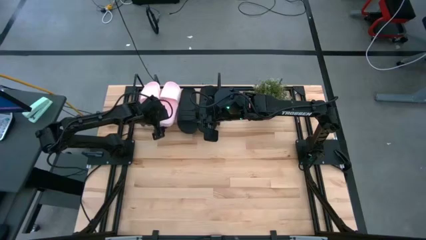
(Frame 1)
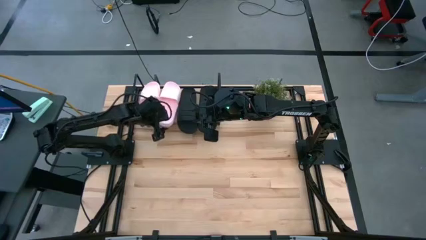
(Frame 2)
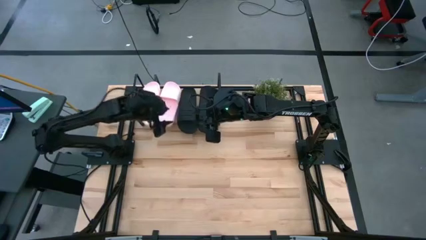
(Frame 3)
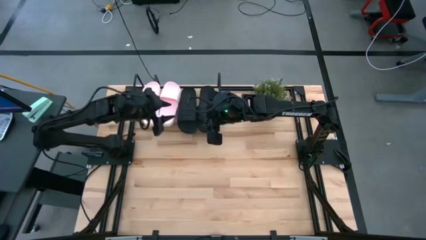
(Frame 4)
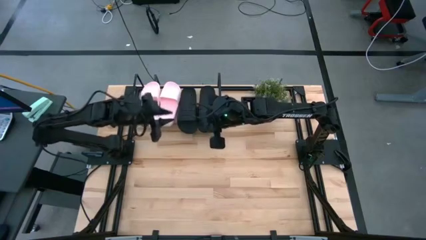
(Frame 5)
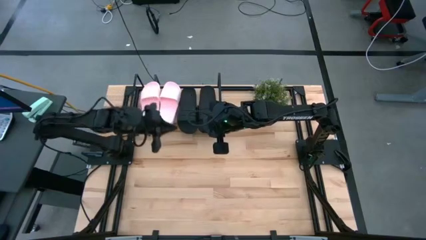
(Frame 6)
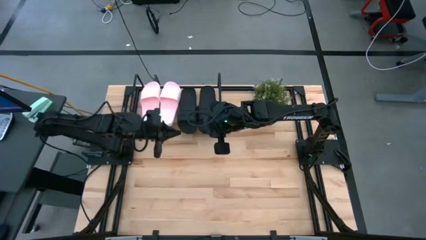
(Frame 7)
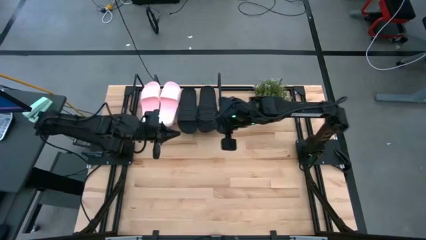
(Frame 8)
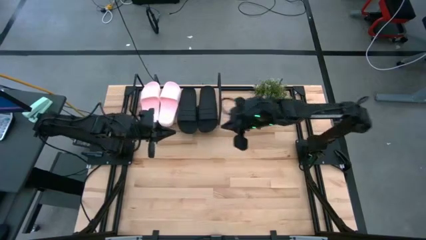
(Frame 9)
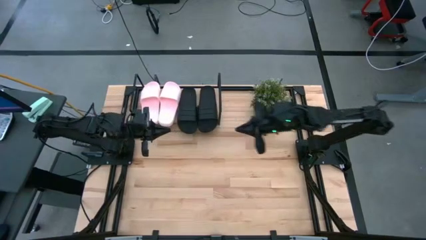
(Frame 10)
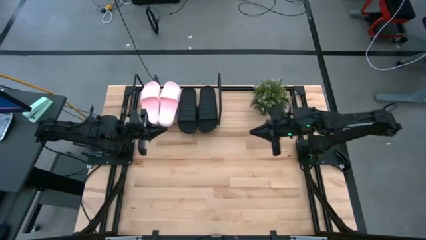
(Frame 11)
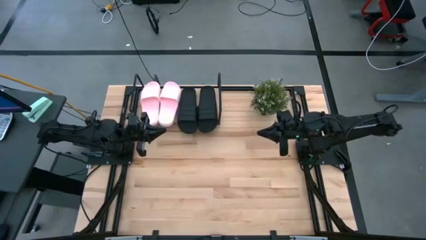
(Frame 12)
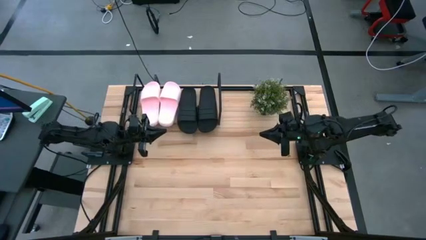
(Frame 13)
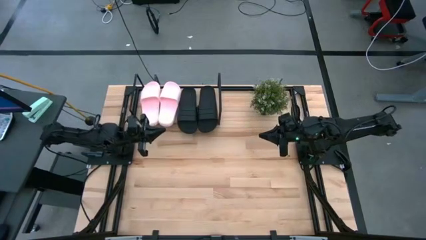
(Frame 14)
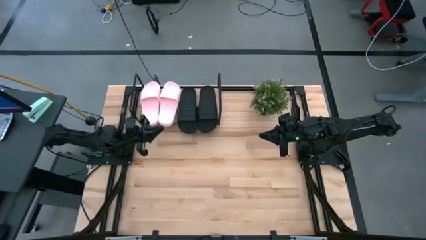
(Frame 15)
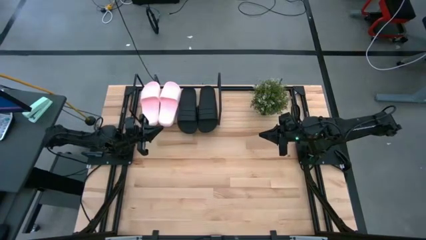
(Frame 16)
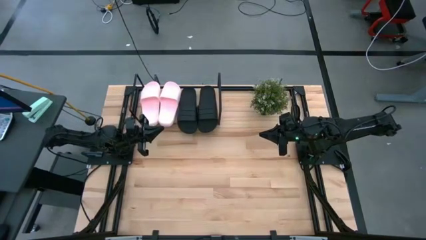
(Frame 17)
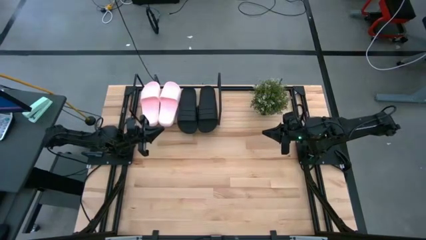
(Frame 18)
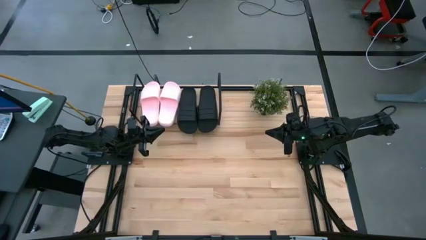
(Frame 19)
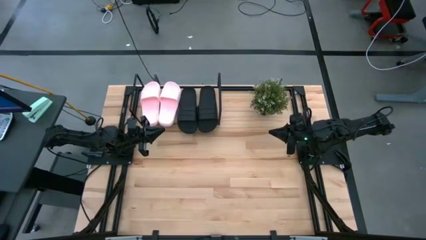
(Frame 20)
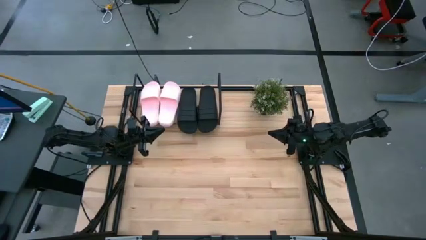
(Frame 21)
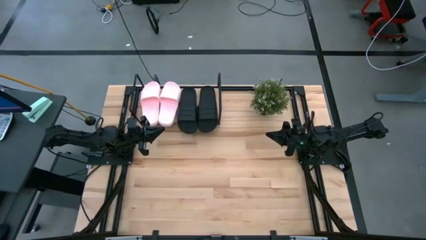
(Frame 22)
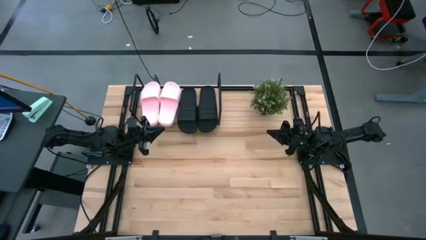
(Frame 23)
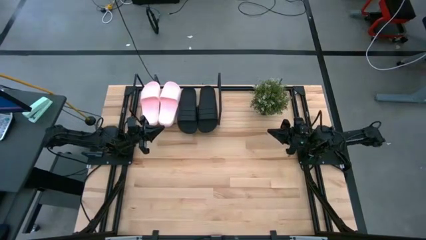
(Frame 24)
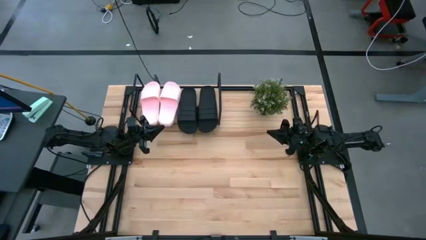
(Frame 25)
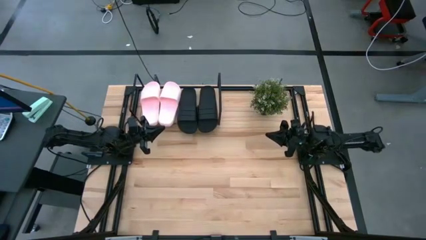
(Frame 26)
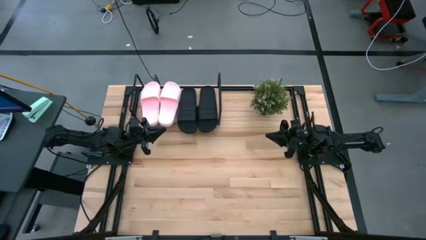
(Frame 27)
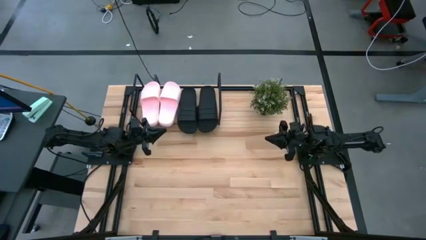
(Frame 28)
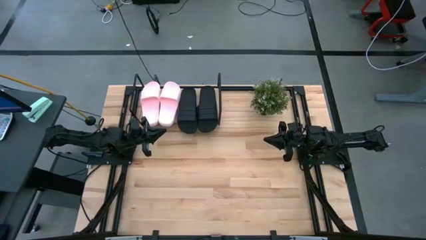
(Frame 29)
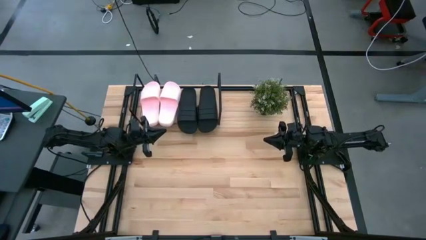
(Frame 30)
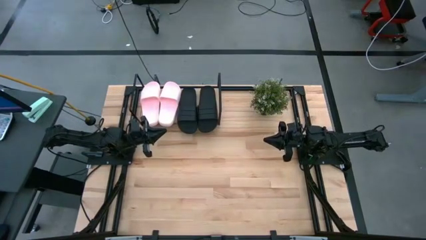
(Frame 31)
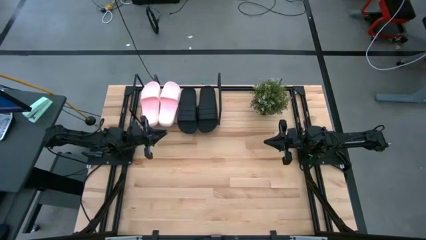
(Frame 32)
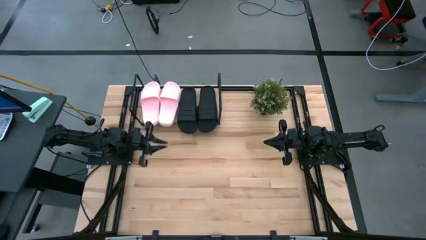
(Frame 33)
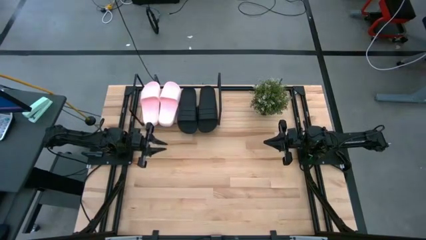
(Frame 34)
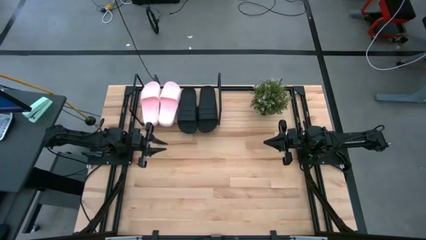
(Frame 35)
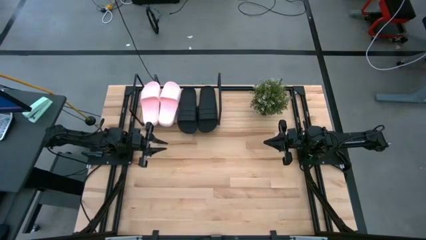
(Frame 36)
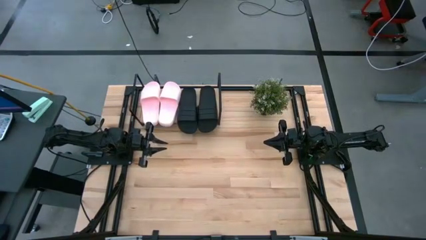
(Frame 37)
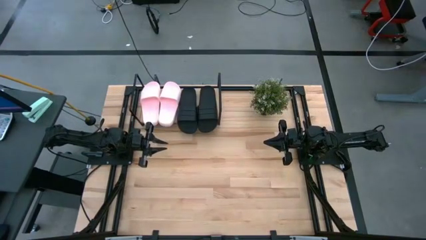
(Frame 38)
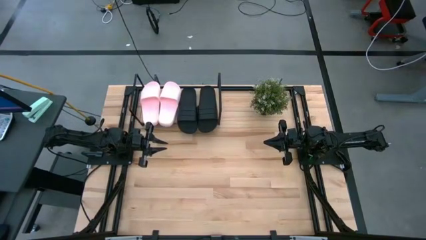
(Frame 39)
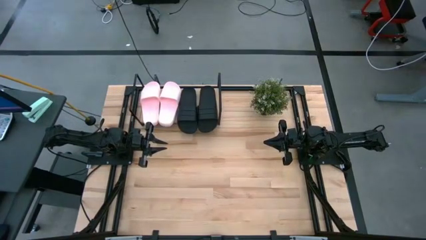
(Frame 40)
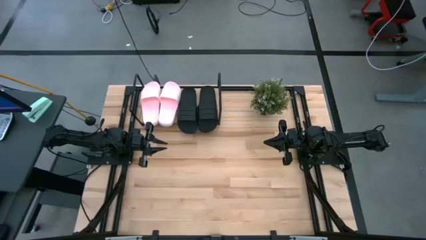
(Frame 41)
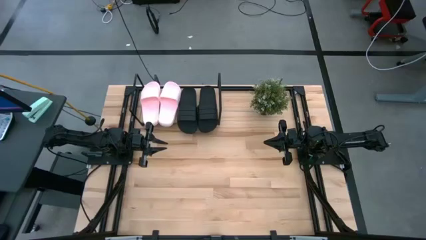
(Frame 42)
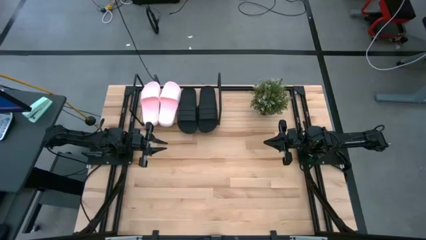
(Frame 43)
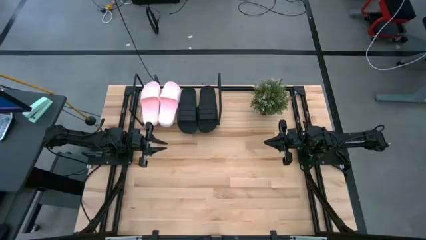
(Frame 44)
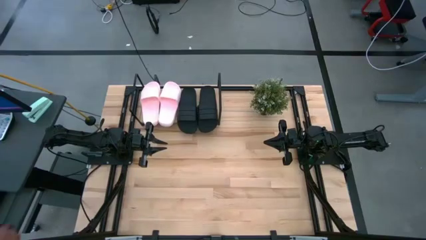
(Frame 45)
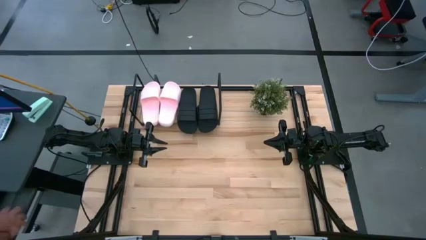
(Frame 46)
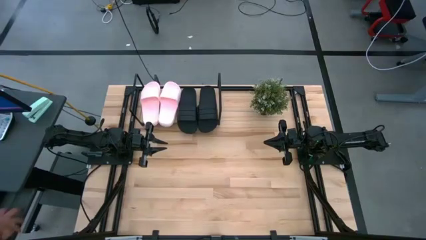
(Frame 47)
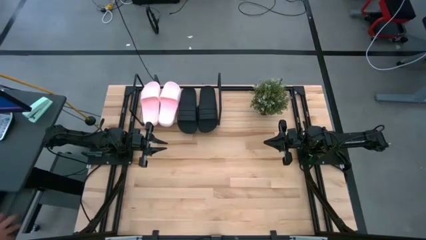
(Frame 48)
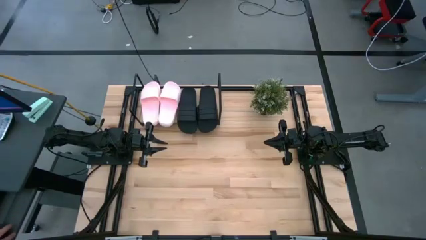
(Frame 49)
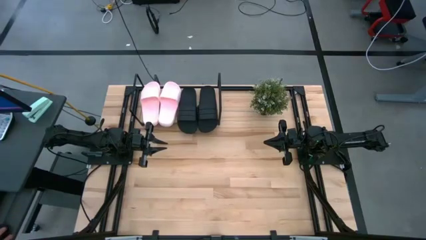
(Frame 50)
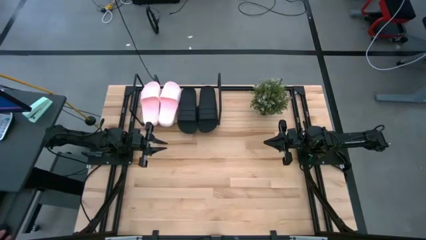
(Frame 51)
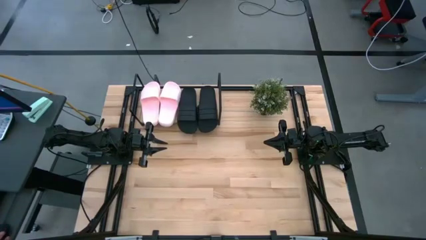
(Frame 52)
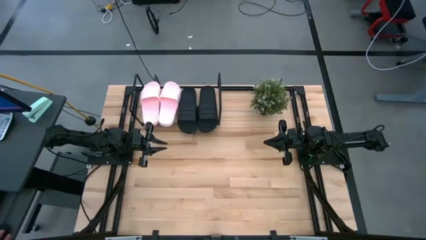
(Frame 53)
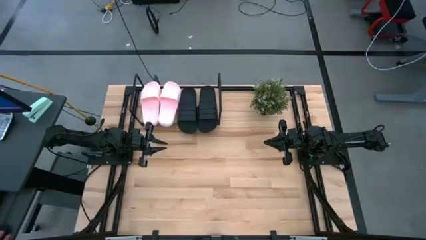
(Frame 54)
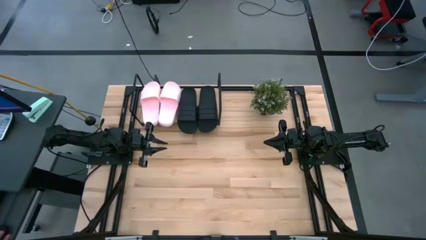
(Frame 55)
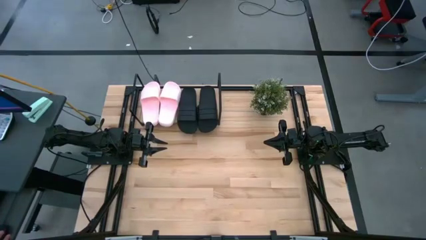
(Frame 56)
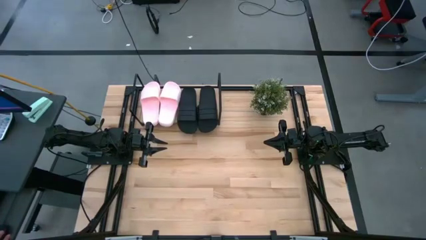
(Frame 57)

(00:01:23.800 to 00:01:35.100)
Task: Pick and place slides into the shelf
Return to Home Position
